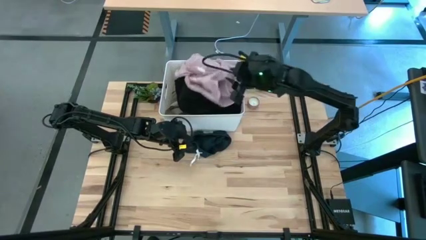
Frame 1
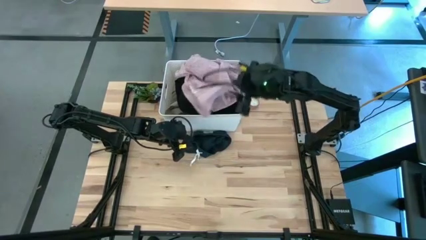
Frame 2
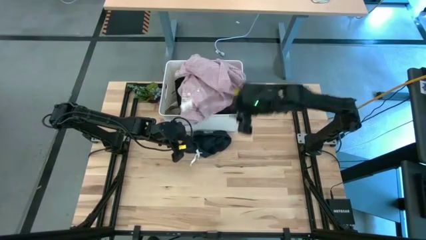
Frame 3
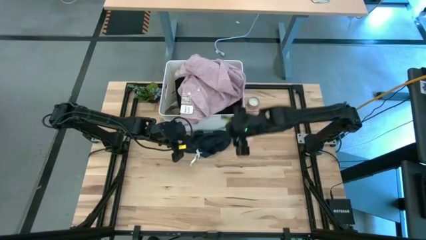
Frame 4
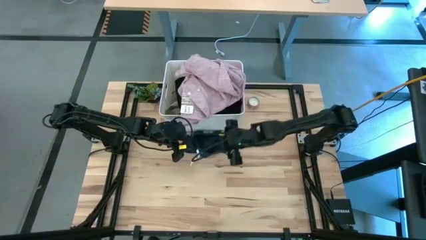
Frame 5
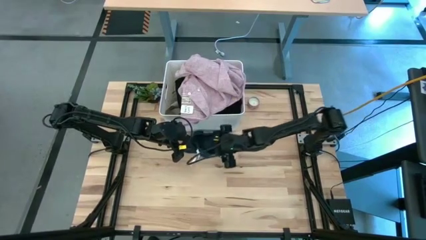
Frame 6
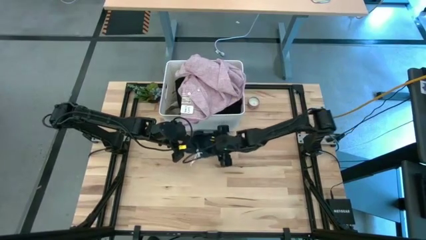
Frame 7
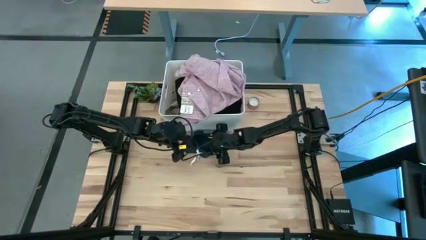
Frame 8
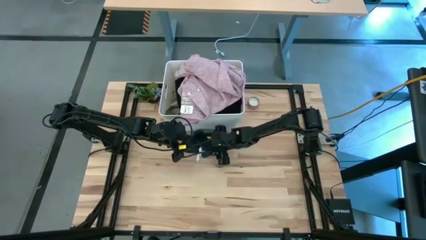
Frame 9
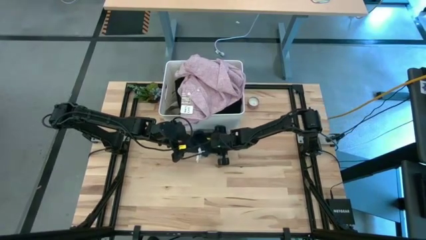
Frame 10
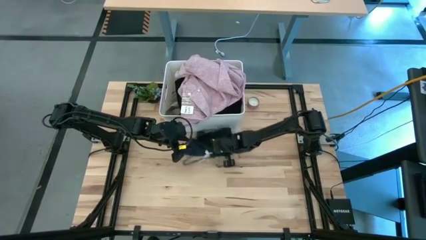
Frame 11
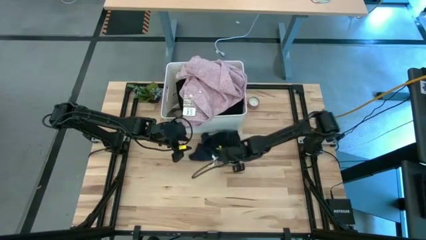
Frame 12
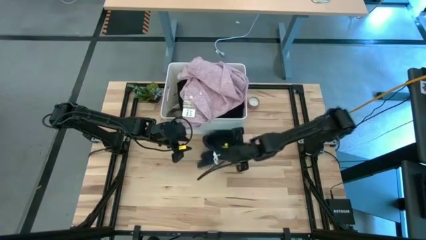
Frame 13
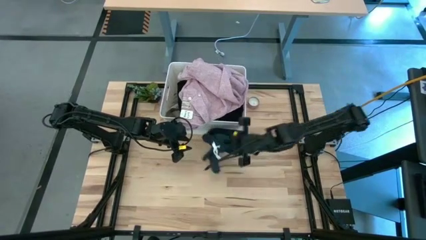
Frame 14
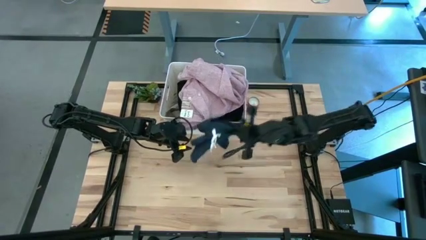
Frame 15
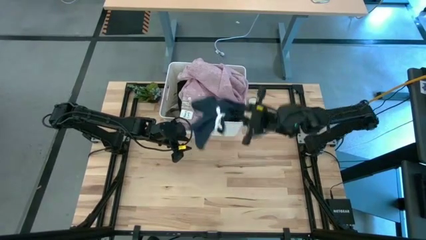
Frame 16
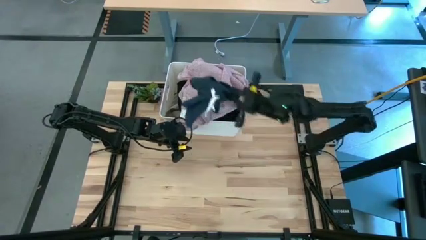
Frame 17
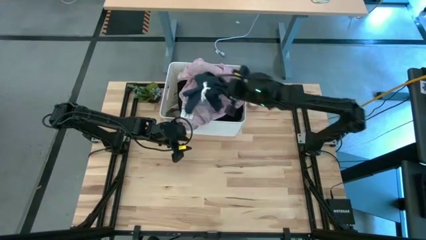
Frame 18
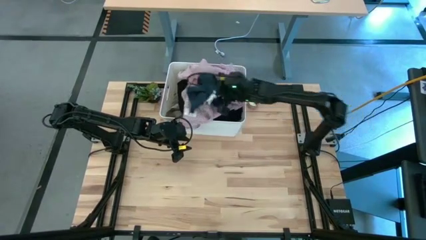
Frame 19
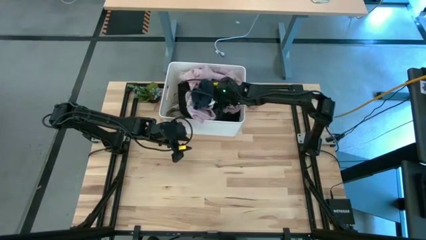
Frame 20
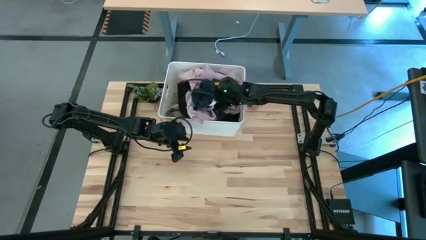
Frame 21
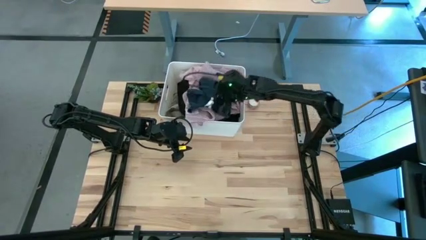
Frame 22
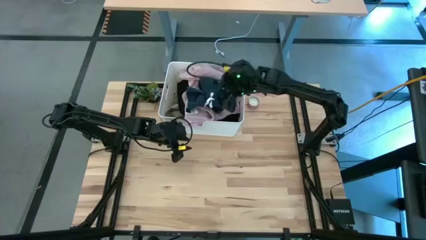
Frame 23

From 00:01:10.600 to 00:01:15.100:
Task: Sort clothes
Put the blue short into the white bin

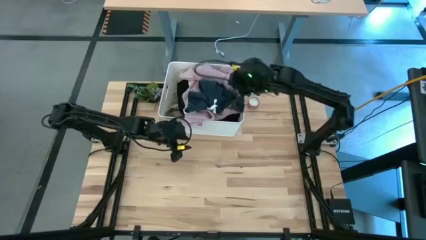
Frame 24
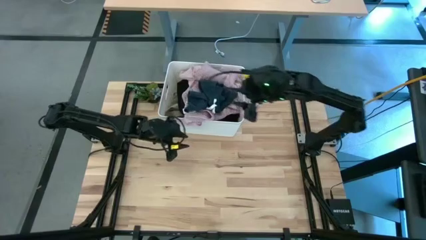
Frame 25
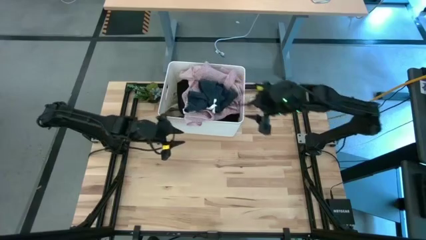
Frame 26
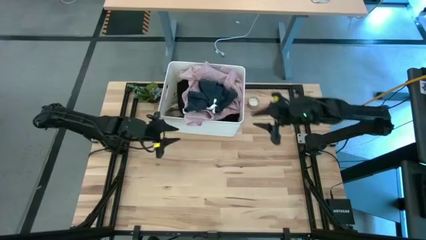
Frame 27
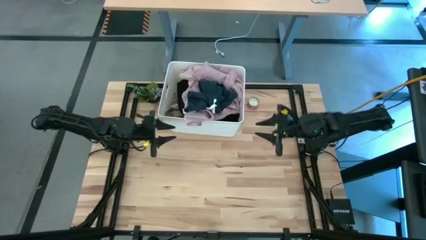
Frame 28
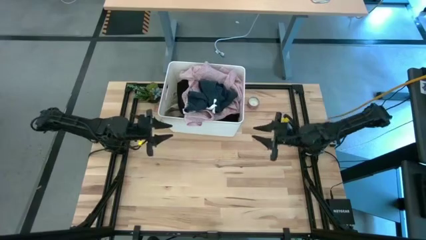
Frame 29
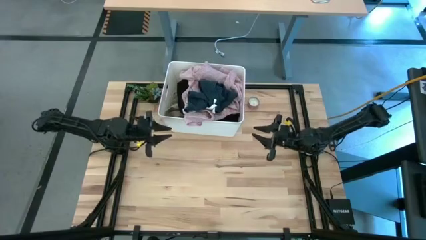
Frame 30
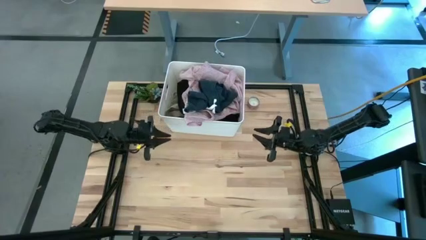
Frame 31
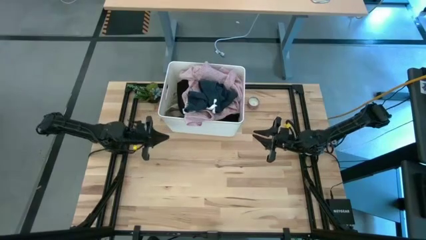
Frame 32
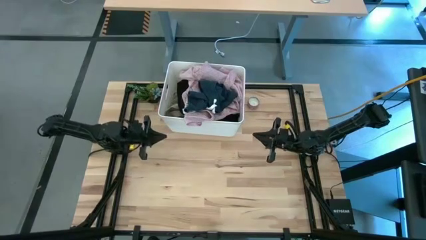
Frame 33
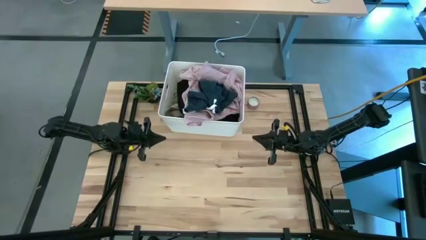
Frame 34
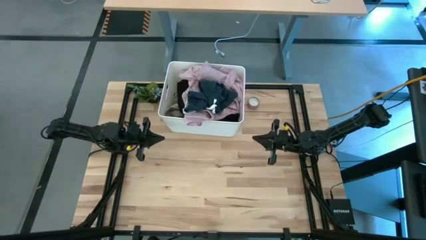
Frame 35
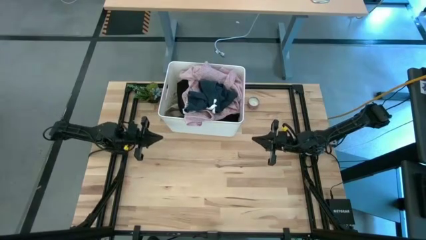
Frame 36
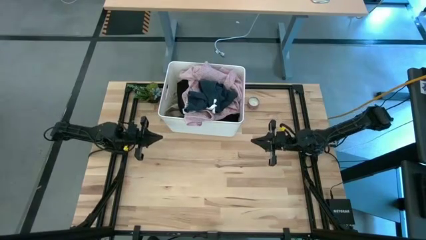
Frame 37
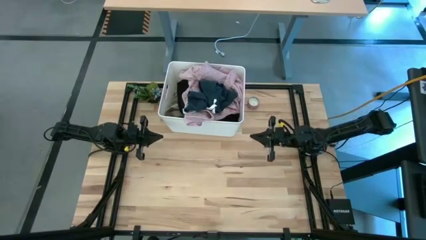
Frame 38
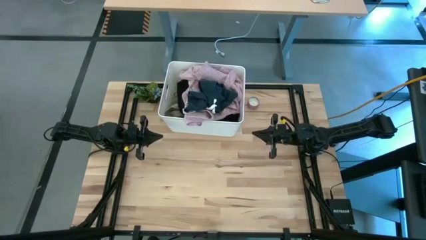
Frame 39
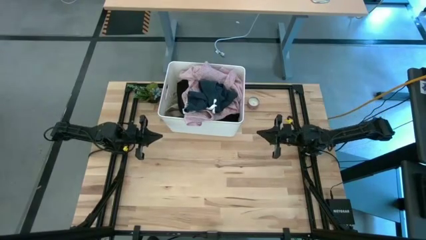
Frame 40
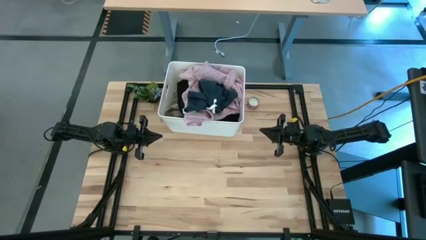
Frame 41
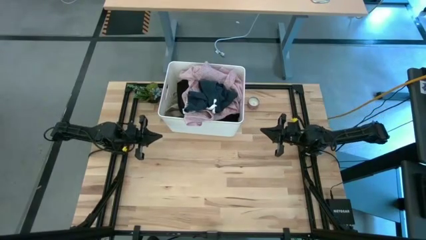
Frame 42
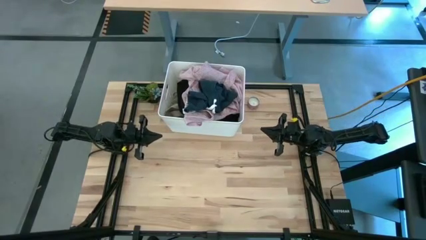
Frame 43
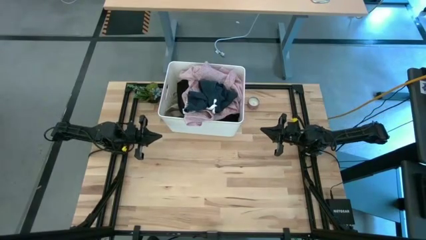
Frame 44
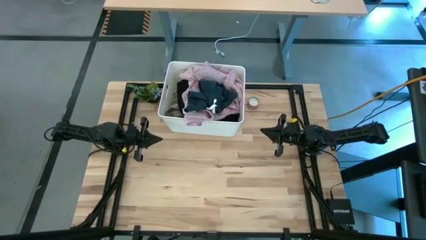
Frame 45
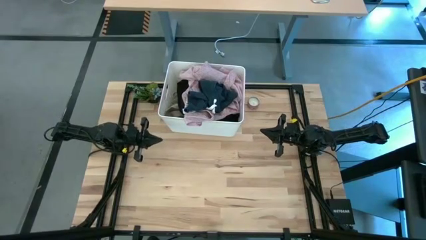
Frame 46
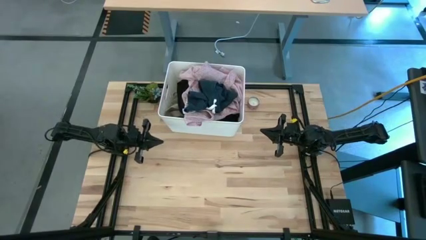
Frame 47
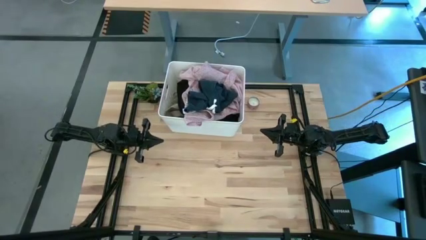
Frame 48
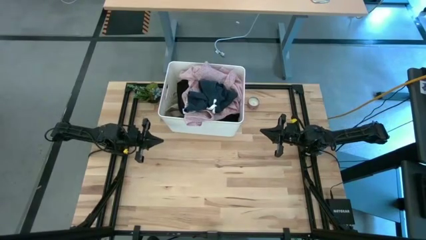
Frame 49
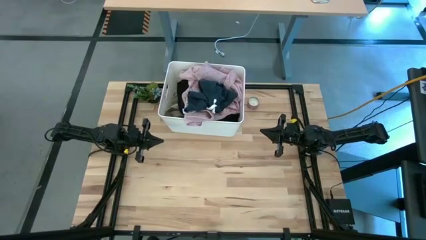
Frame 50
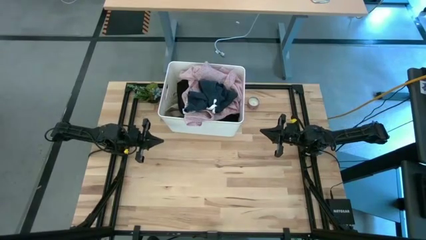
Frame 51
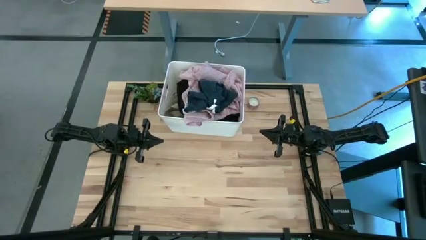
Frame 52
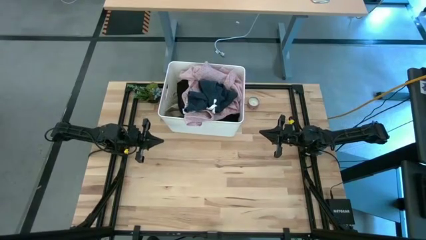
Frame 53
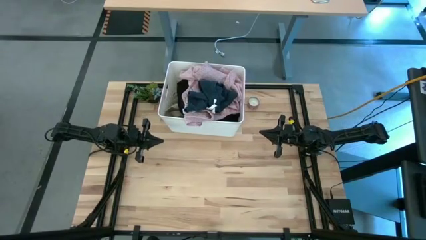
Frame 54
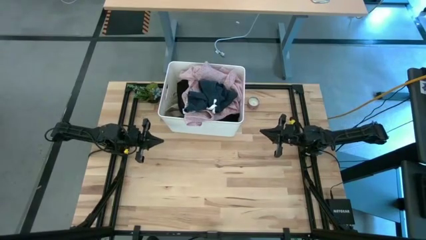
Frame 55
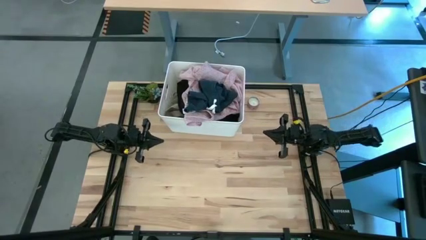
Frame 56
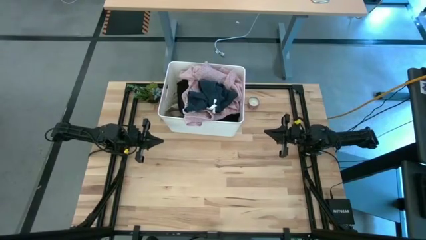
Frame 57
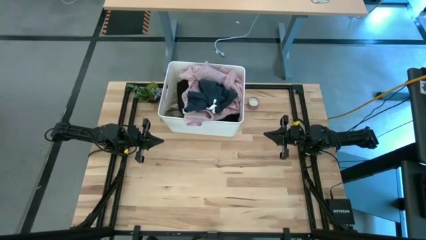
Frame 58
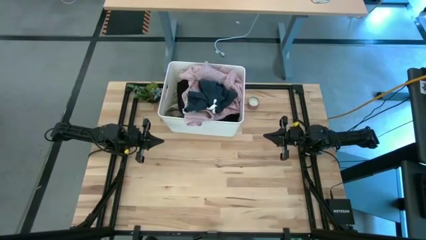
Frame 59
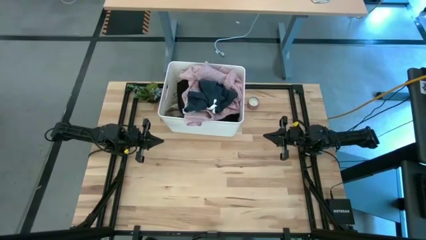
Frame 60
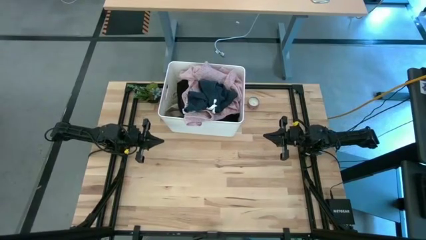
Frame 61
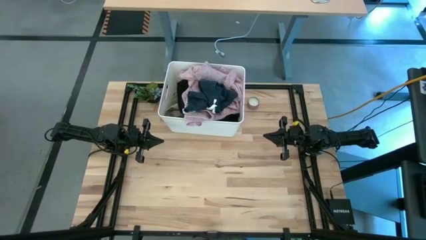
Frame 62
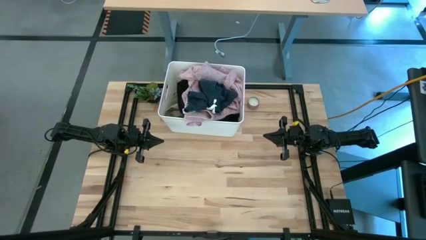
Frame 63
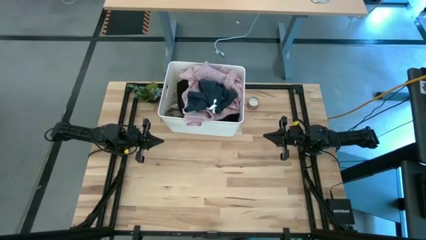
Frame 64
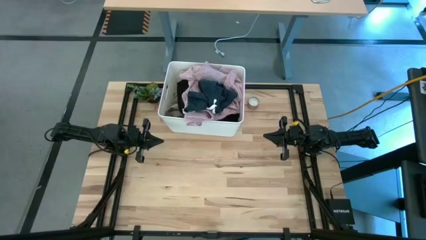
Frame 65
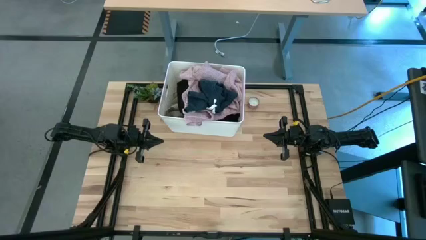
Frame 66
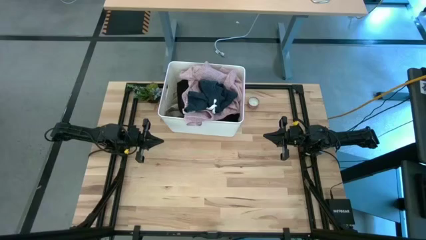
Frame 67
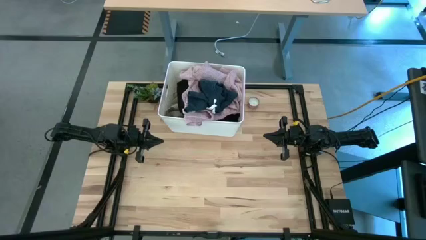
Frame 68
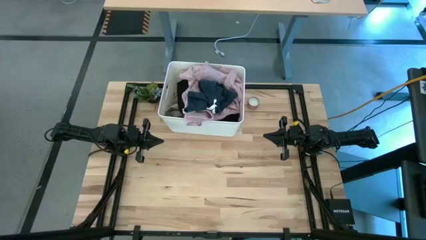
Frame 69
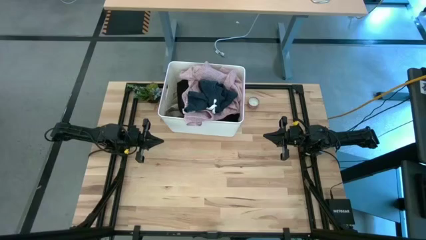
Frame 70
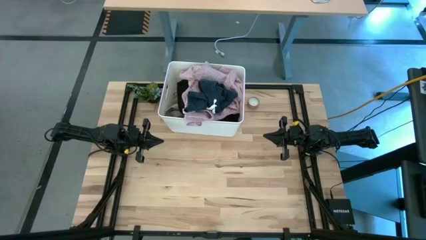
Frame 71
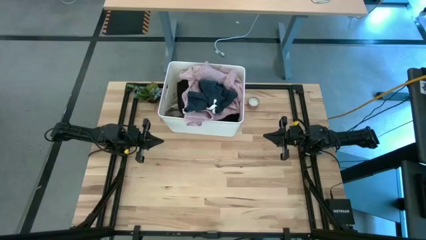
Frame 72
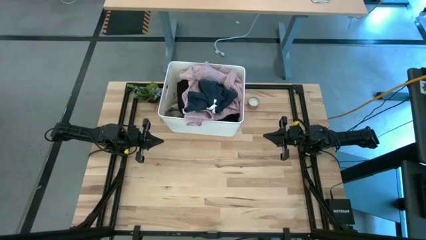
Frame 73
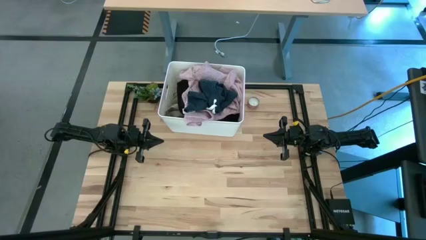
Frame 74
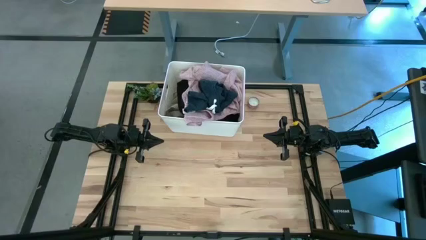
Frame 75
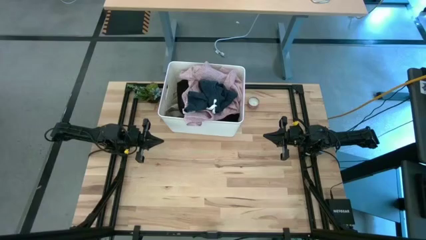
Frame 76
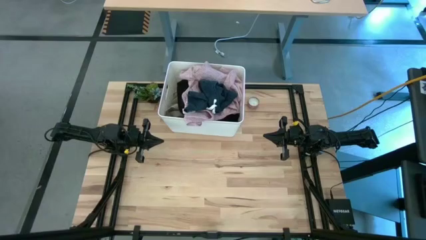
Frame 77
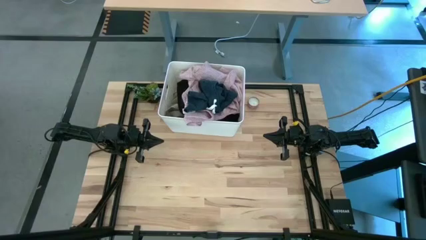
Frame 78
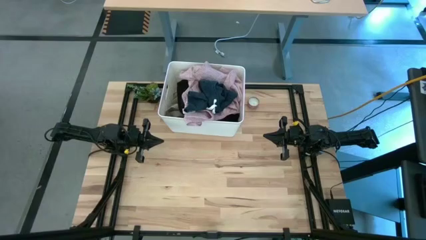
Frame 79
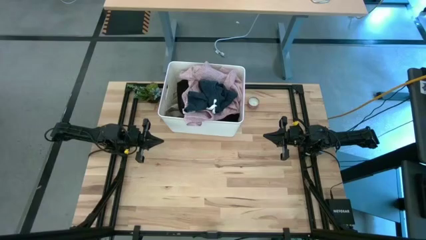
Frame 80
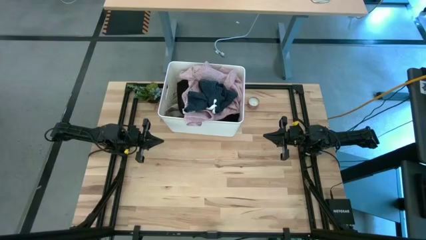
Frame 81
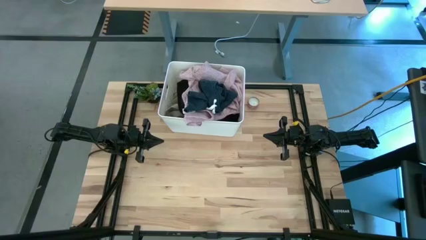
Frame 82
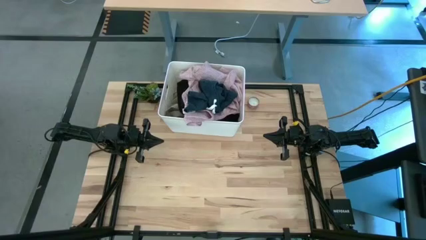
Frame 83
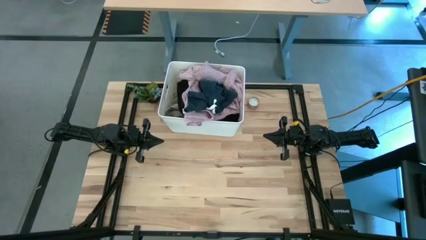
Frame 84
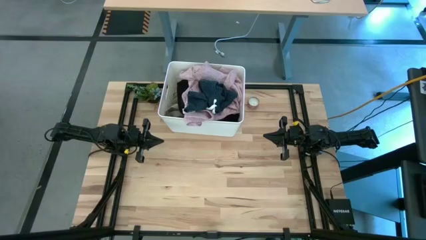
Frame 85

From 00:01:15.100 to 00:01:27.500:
Return to Home Position
